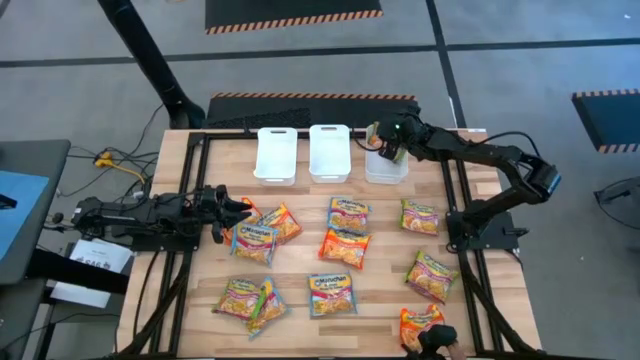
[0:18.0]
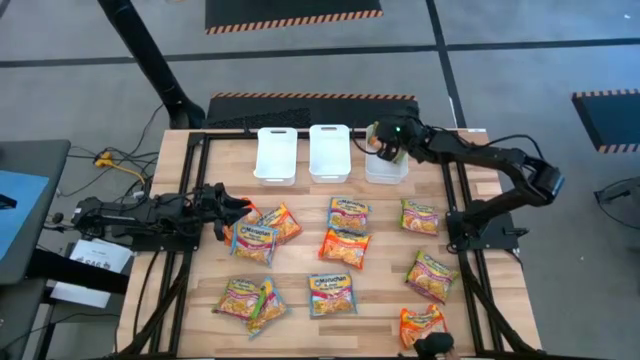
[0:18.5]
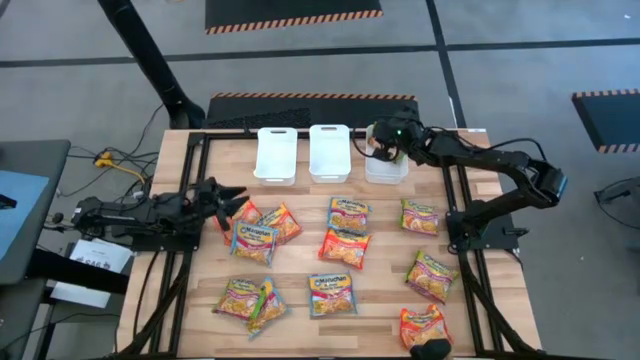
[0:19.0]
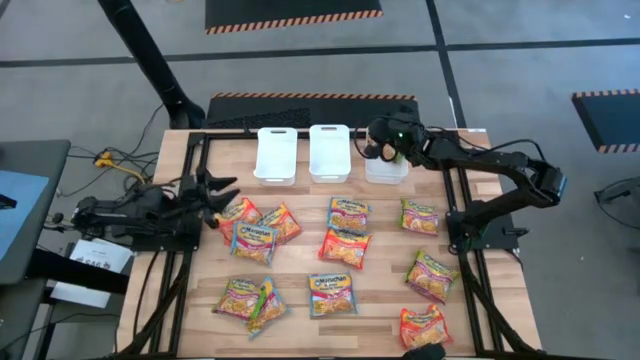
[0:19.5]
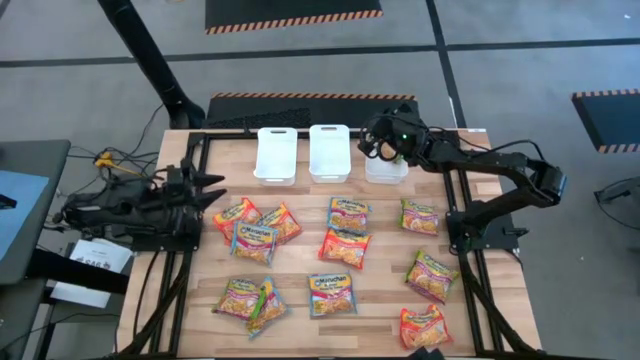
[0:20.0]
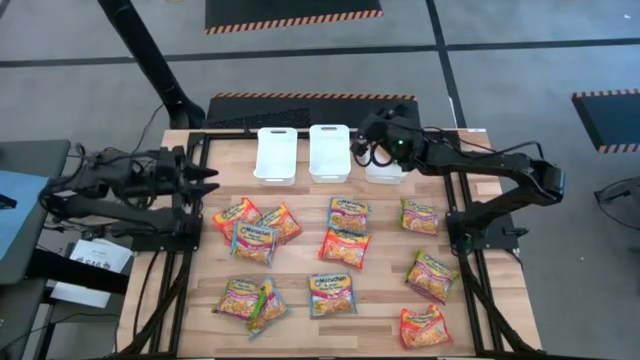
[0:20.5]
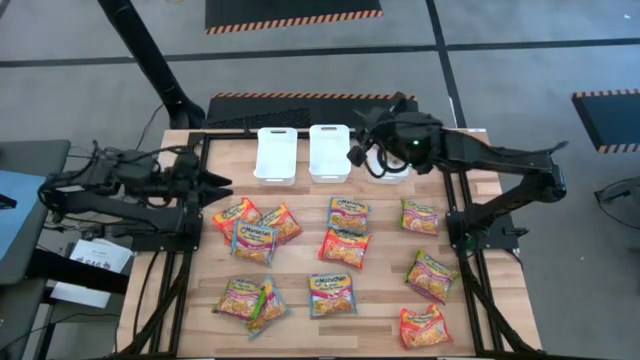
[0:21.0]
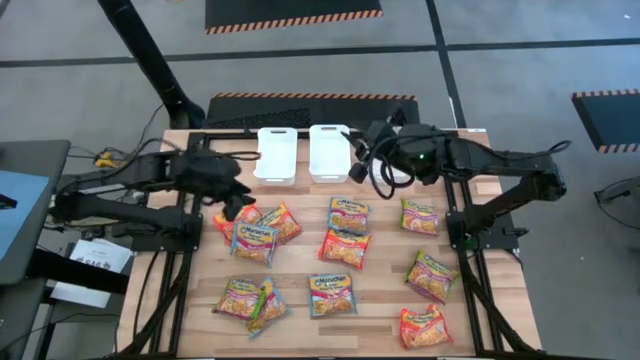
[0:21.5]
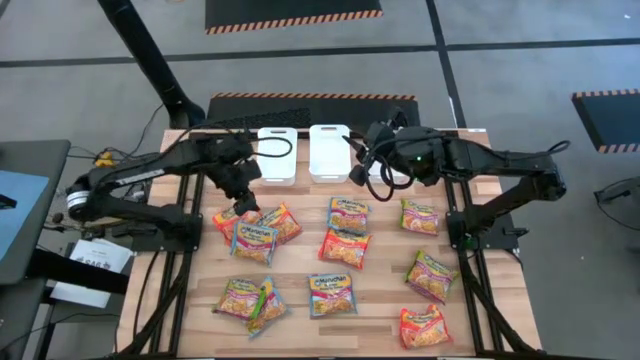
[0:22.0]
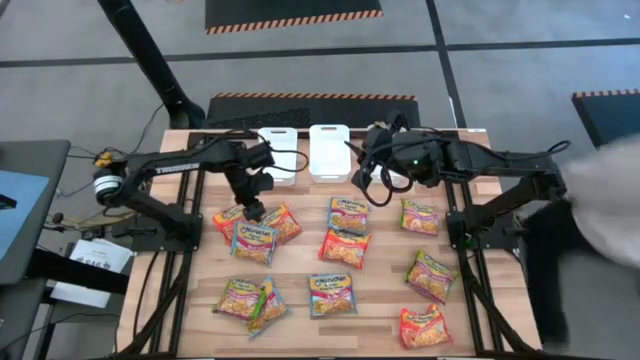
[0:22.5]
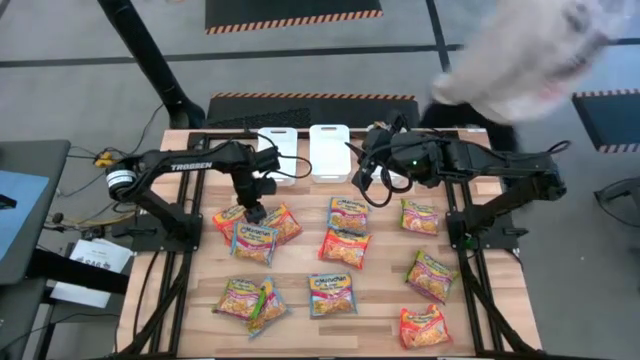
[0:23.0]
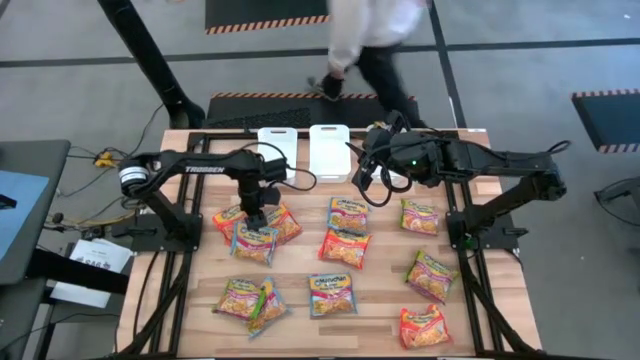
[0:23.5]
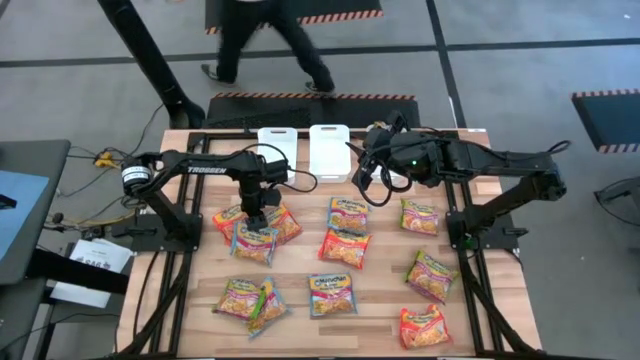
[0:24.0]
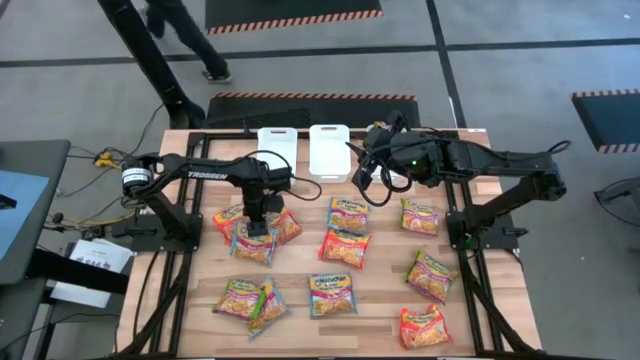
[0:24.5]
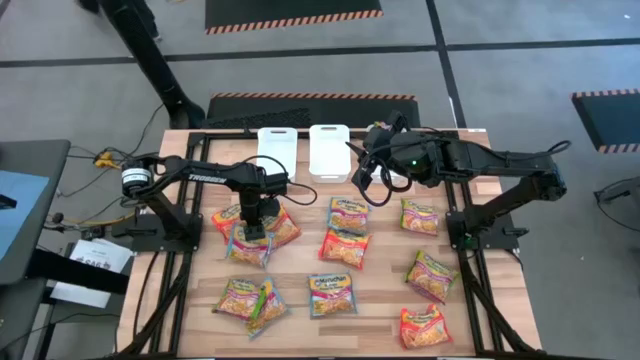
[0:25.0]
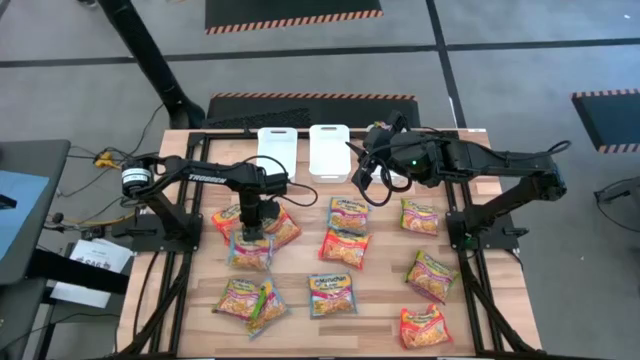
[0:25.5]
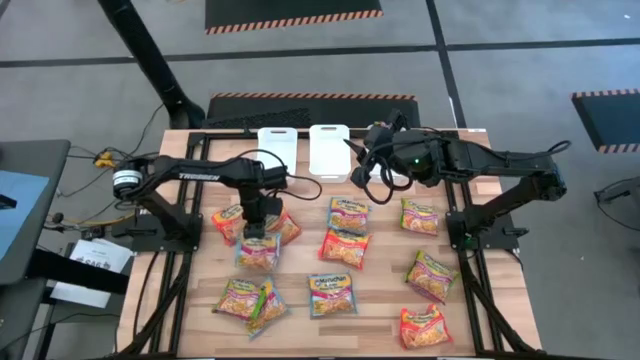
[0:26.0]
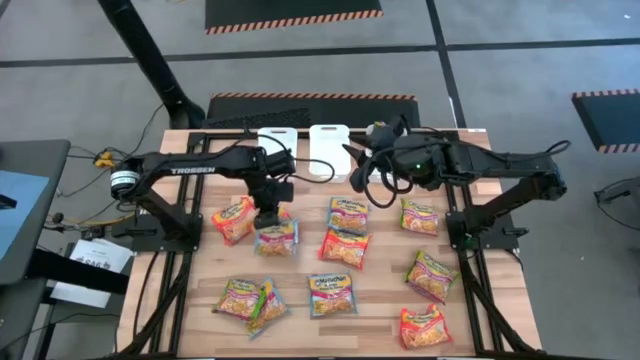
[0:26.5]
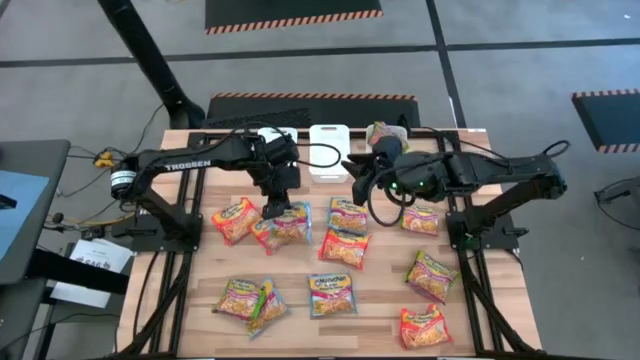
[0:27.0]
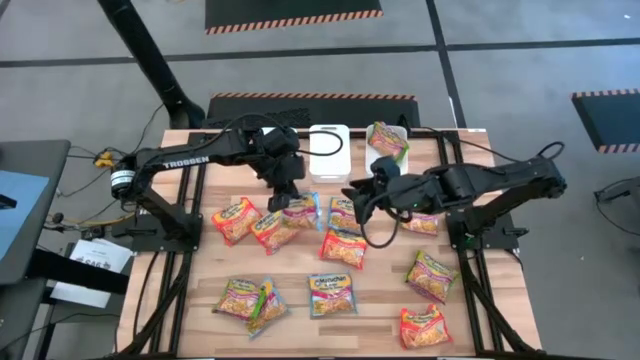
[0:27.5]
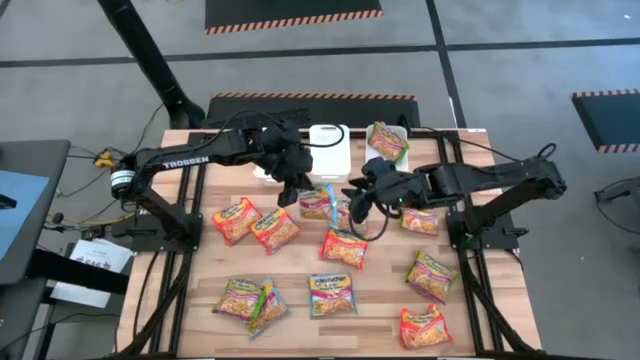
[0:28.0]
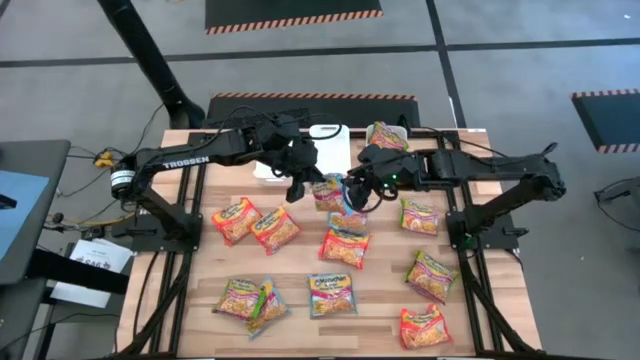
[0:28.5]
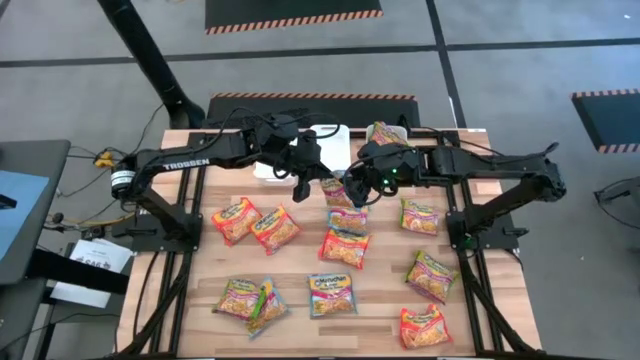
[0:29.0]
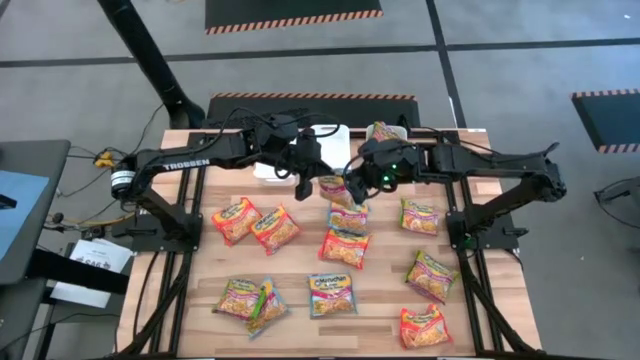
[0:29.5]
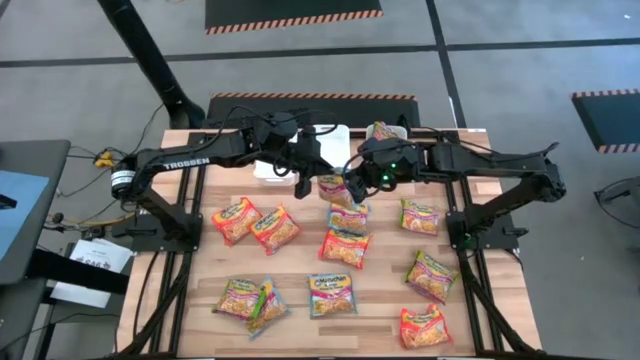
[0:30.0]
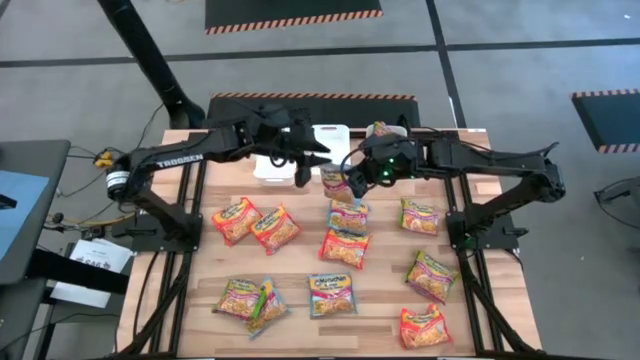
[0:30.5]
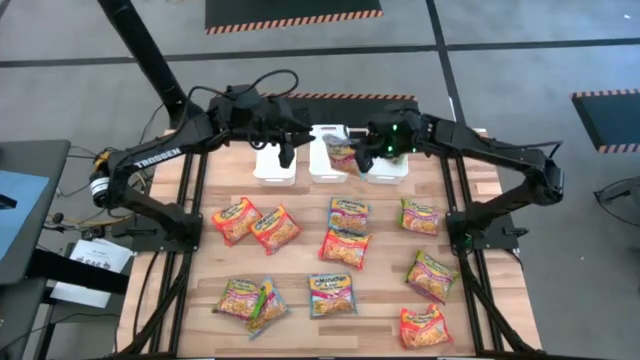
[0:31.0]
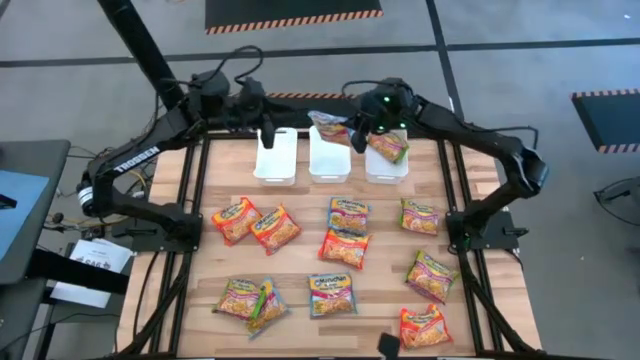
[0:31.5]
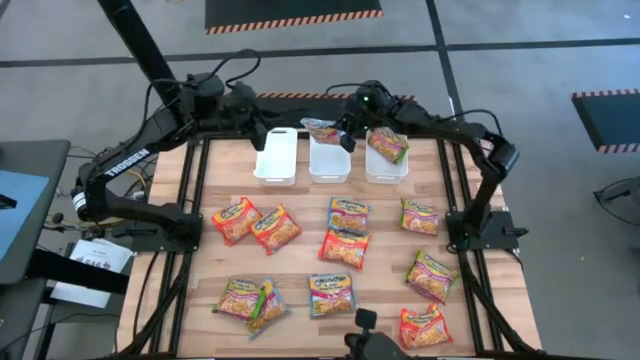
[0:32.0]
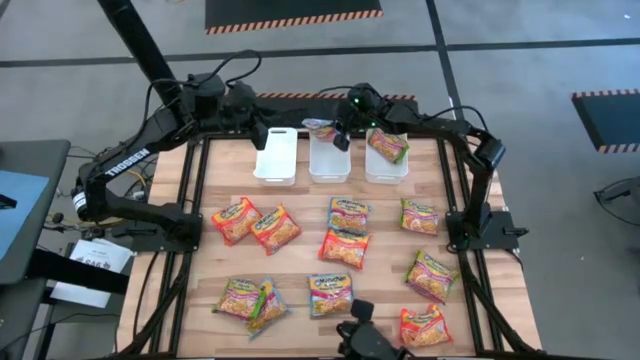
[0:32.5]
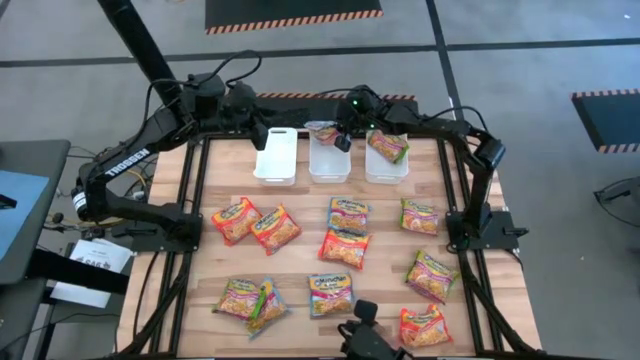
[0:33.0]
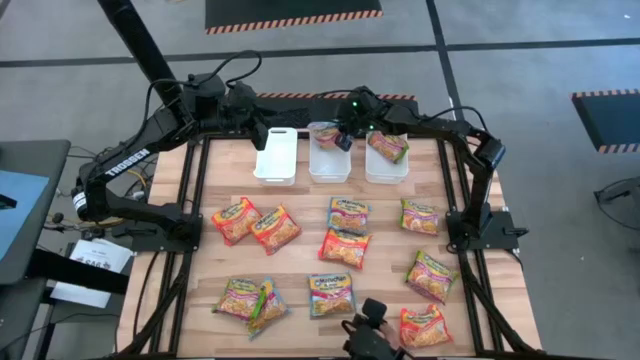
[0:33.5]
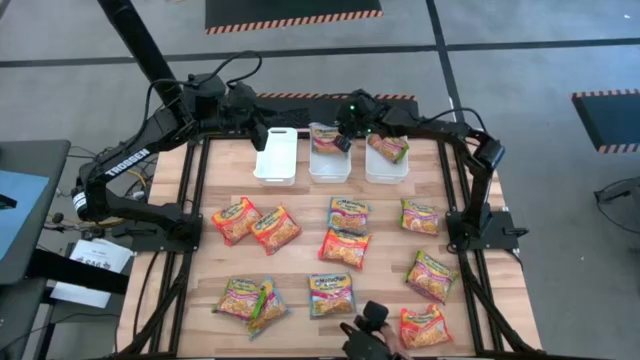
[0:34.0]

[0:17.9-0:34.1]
Task: Sort Maruchan noodles
Put the blue noodle pack into the center white bin

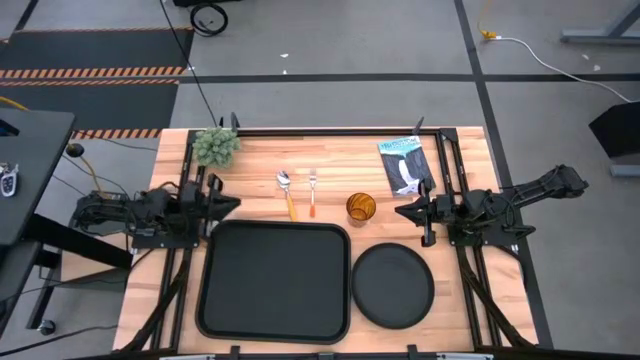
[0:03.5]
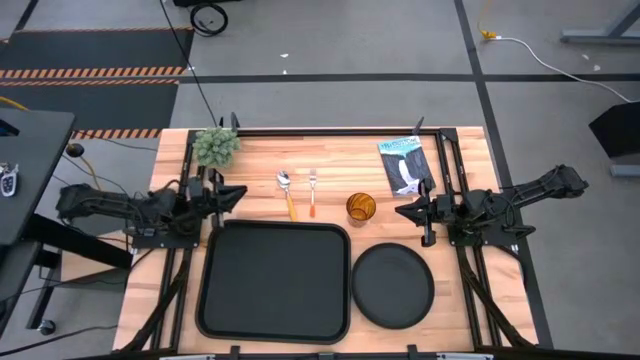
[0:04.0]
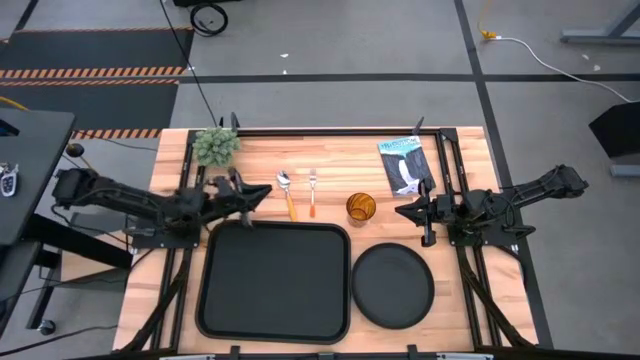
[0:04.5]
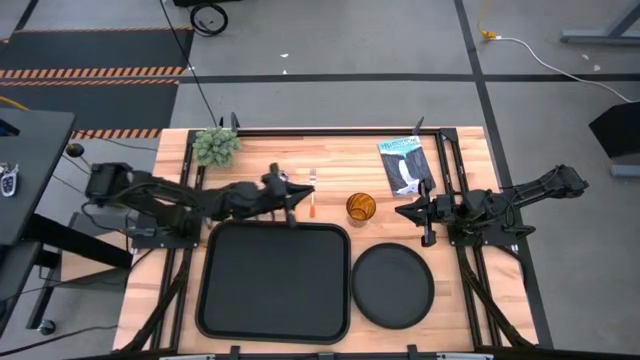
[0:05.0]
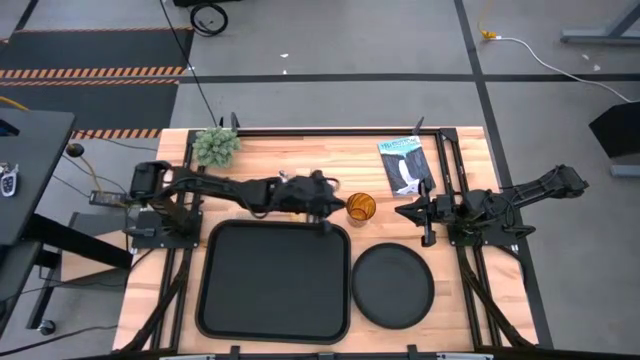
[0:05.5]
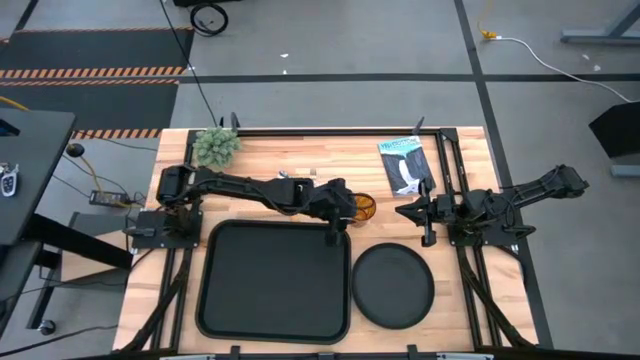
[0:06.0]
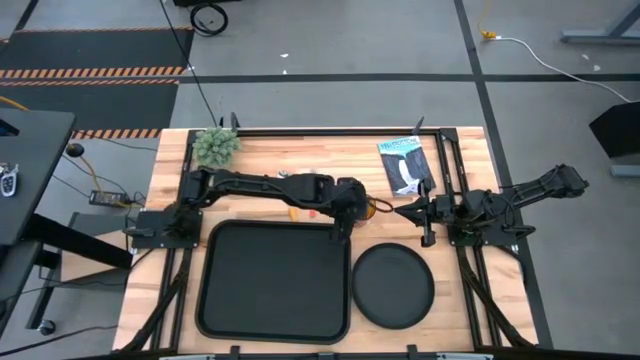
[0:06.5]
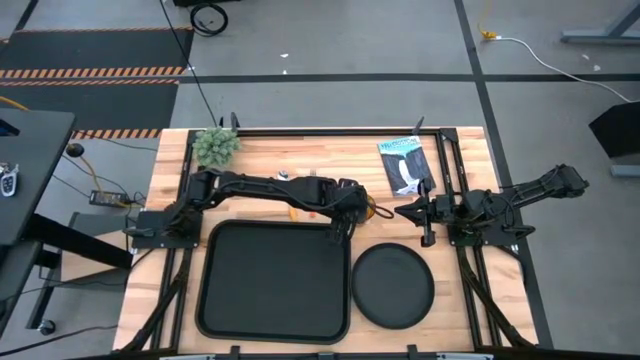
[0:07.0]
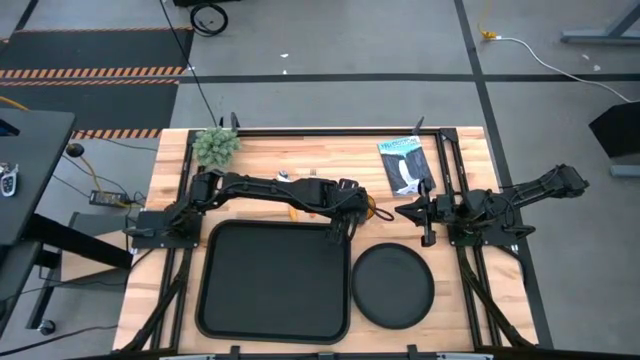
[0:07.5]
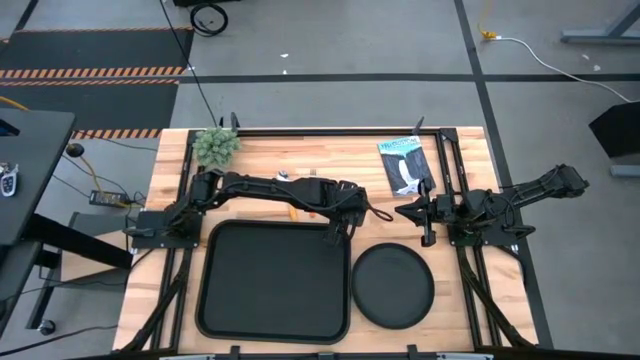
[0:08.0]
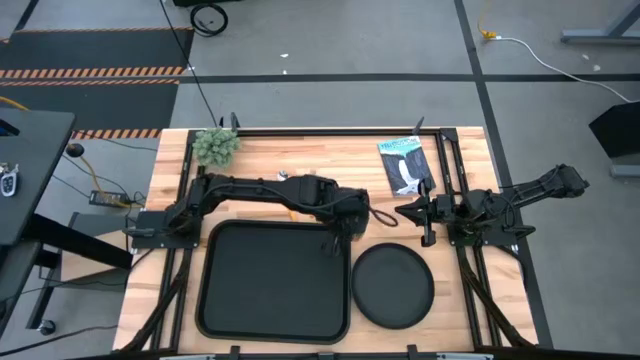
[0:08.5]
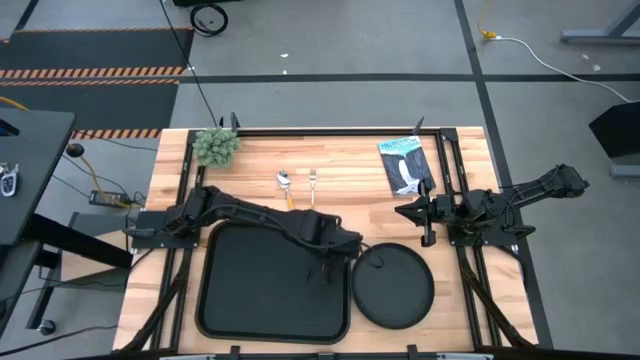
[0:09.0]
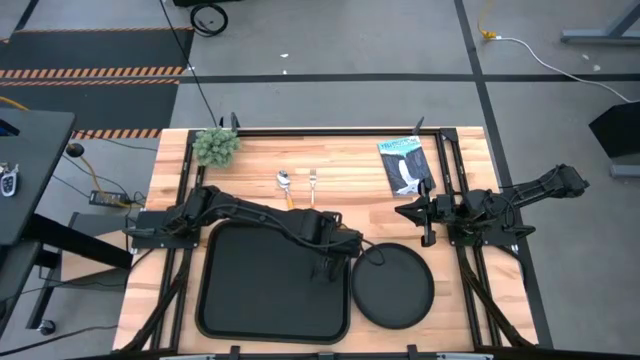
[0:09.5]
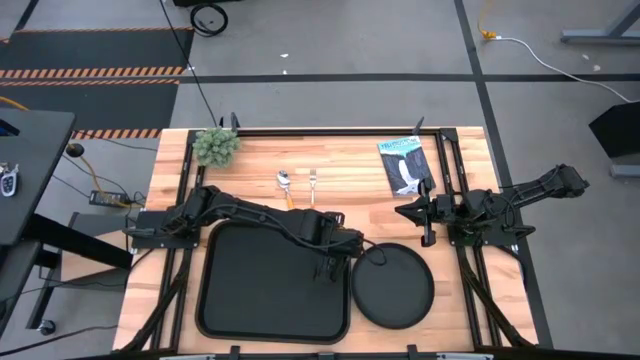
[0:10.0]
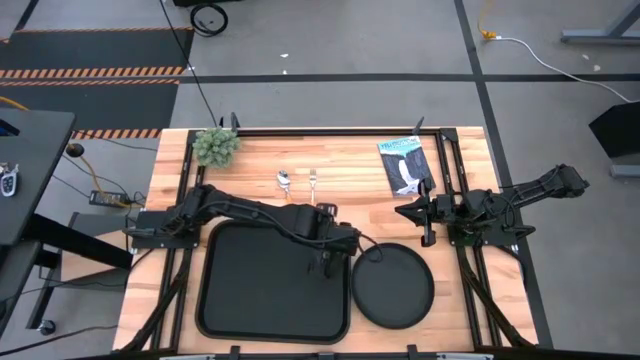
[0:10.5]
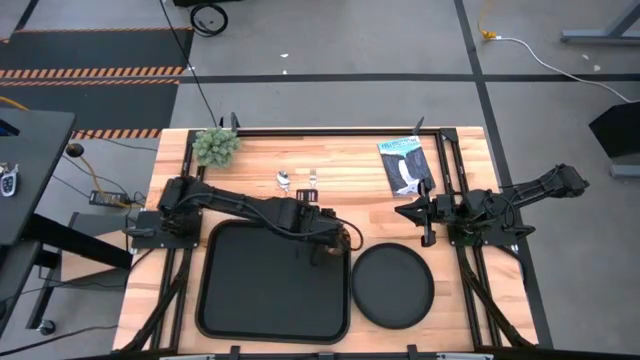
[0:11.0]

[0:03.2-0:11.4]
Task: Pick and place plate/cup/fork/spoon on tray
Put the orange glass on the black serving tray
